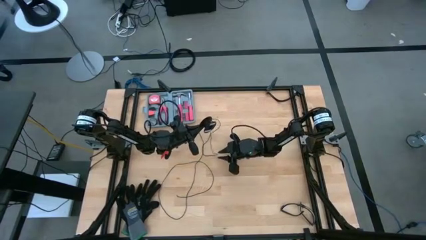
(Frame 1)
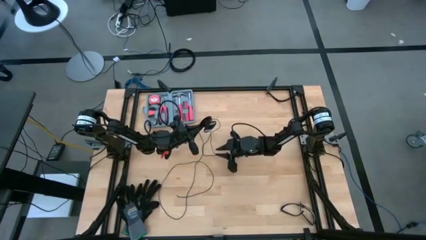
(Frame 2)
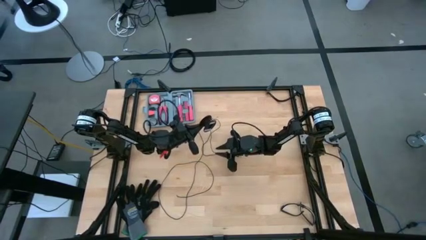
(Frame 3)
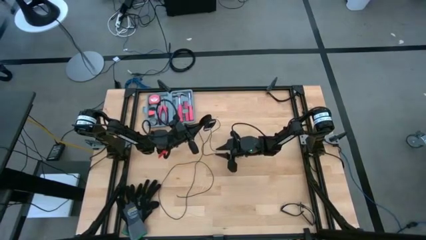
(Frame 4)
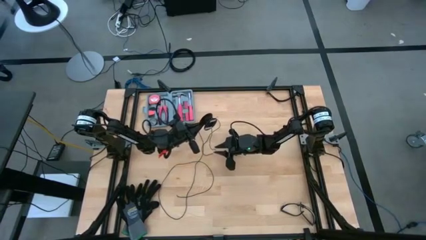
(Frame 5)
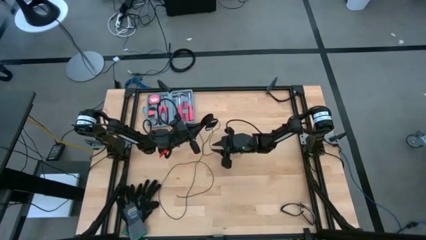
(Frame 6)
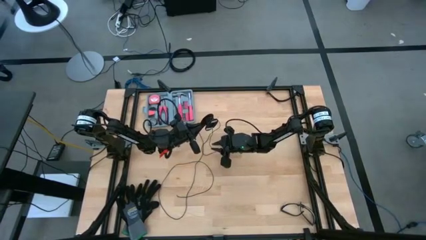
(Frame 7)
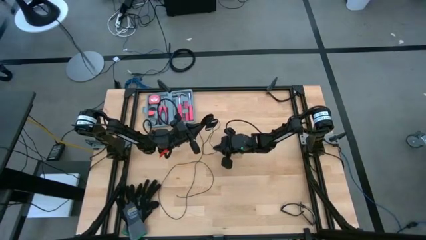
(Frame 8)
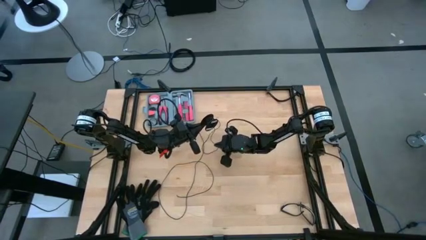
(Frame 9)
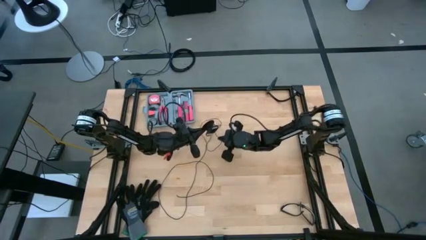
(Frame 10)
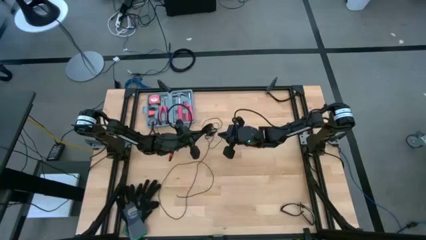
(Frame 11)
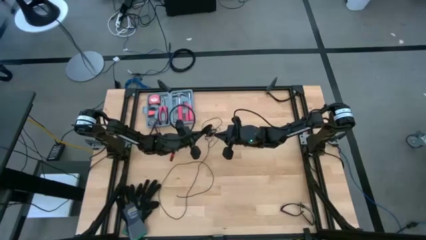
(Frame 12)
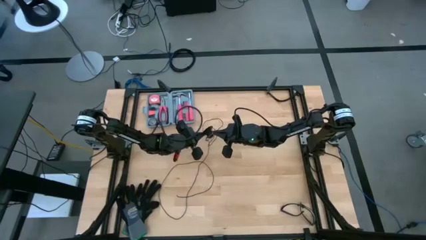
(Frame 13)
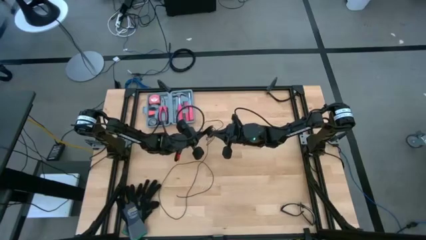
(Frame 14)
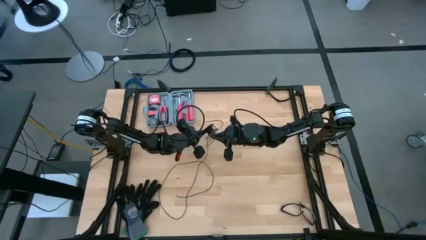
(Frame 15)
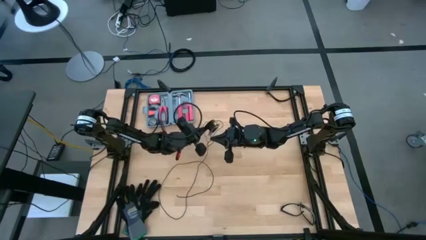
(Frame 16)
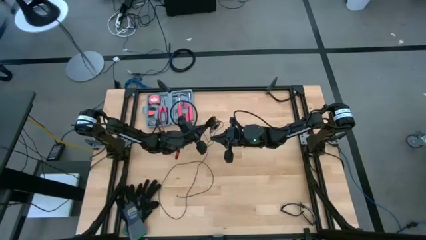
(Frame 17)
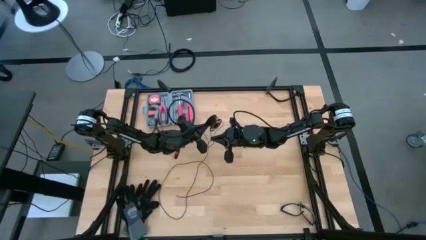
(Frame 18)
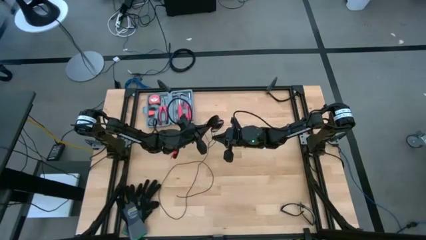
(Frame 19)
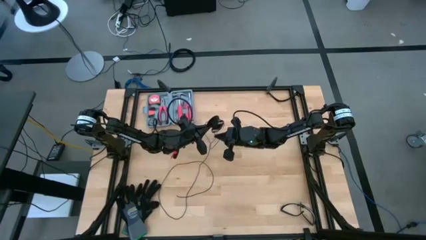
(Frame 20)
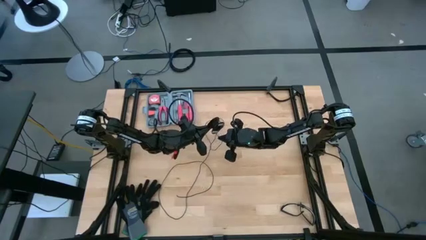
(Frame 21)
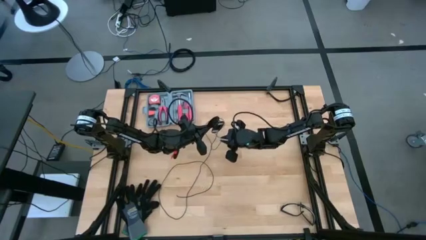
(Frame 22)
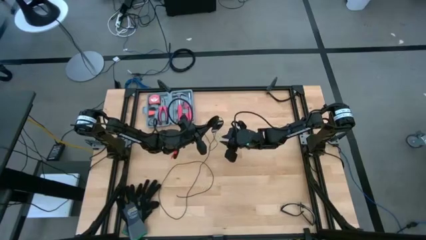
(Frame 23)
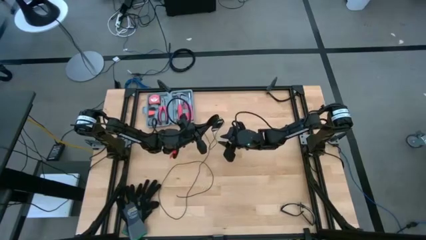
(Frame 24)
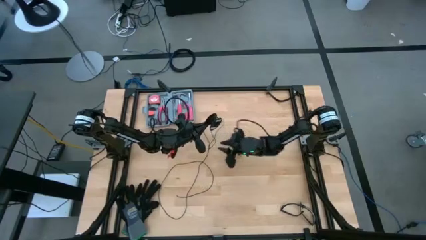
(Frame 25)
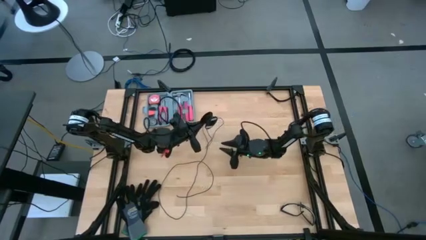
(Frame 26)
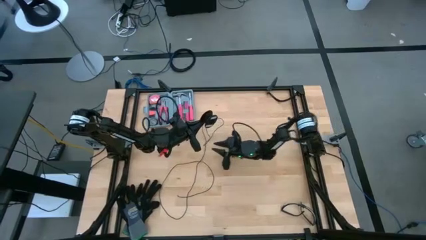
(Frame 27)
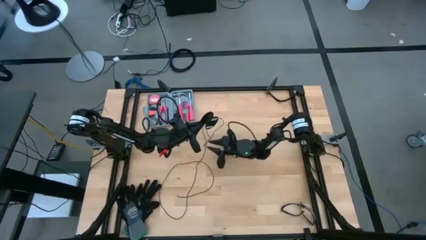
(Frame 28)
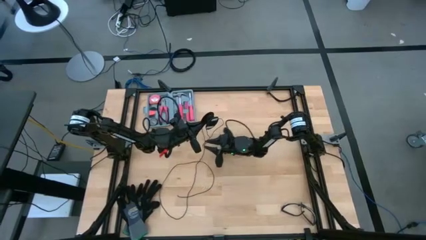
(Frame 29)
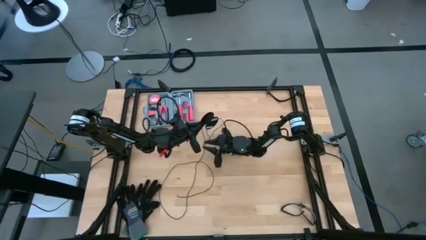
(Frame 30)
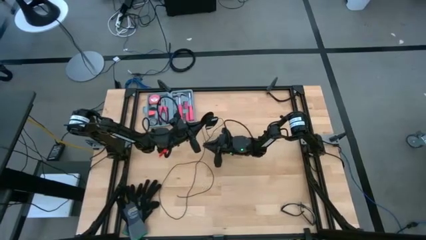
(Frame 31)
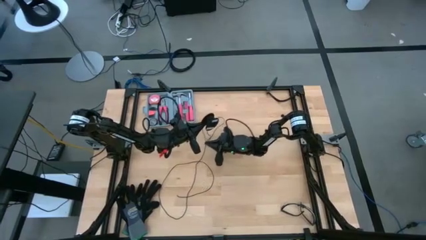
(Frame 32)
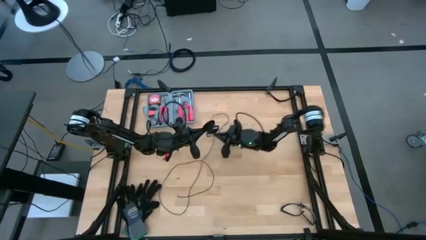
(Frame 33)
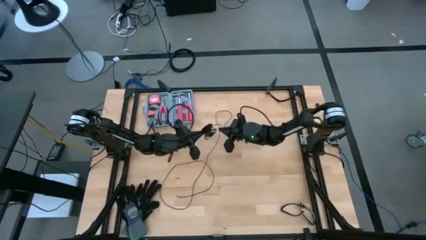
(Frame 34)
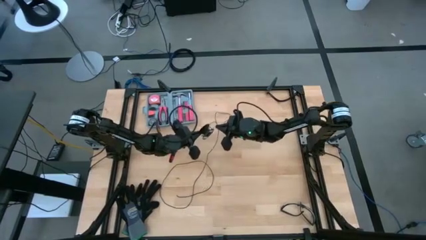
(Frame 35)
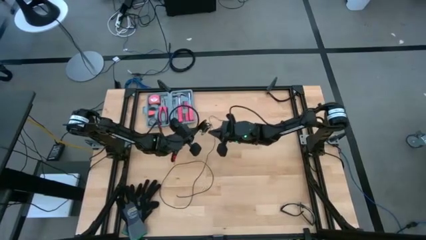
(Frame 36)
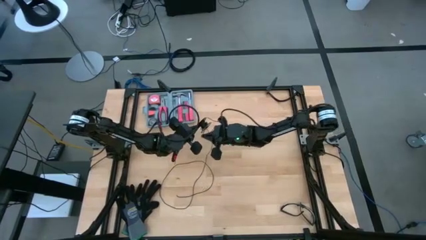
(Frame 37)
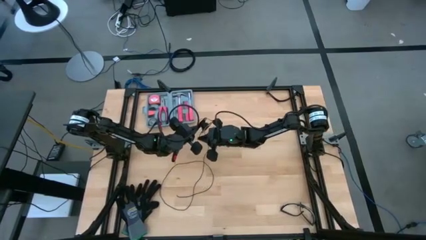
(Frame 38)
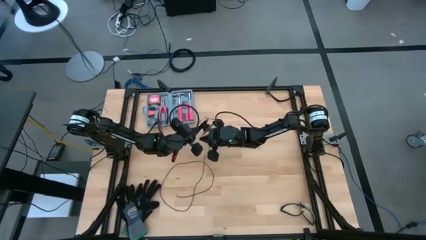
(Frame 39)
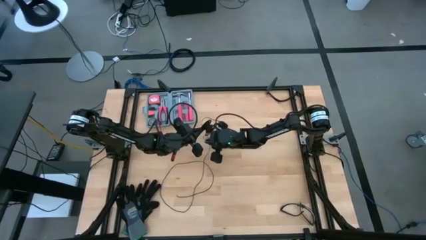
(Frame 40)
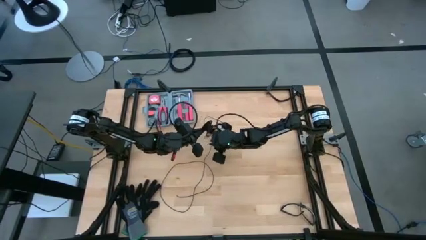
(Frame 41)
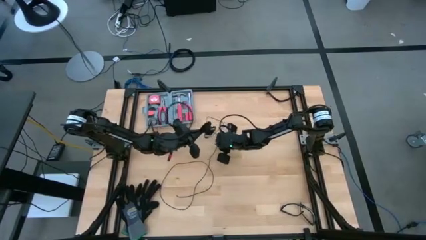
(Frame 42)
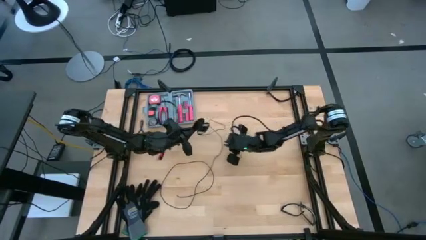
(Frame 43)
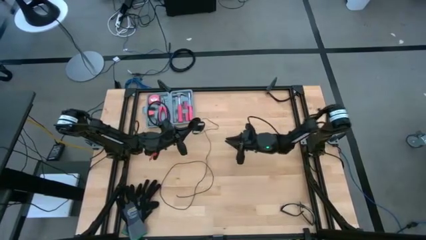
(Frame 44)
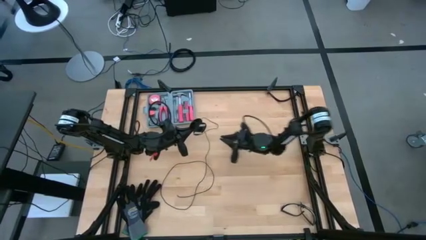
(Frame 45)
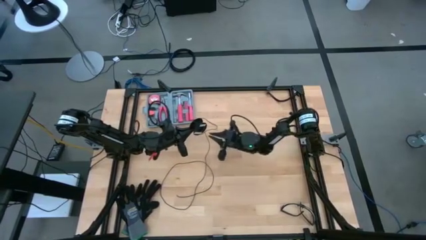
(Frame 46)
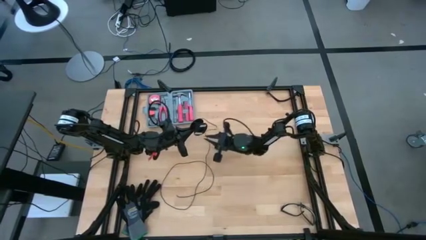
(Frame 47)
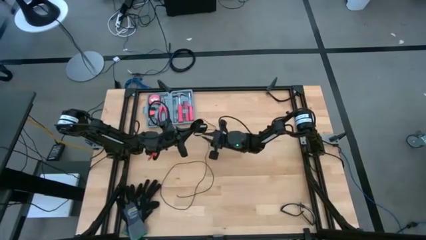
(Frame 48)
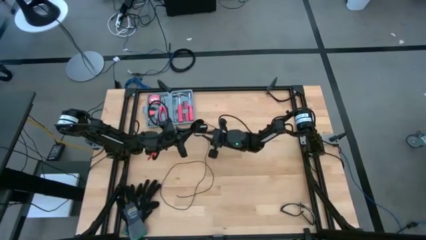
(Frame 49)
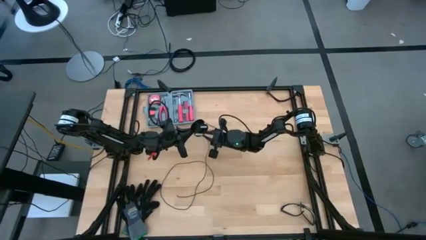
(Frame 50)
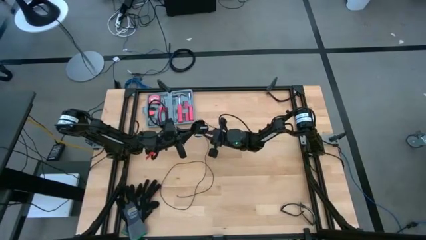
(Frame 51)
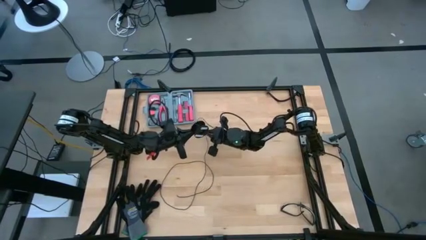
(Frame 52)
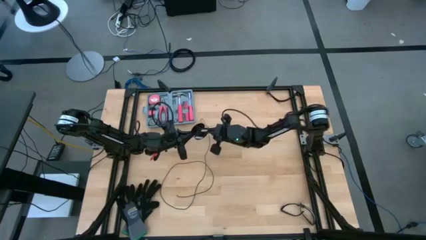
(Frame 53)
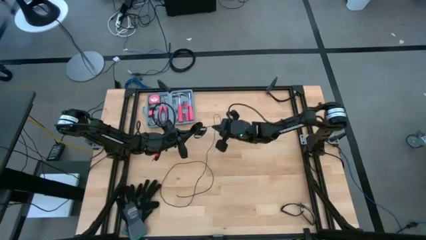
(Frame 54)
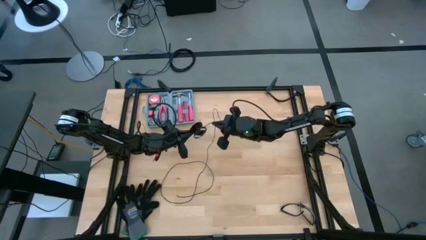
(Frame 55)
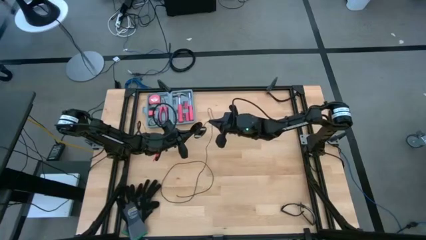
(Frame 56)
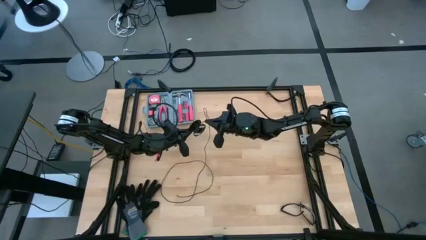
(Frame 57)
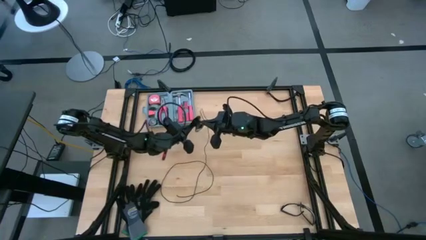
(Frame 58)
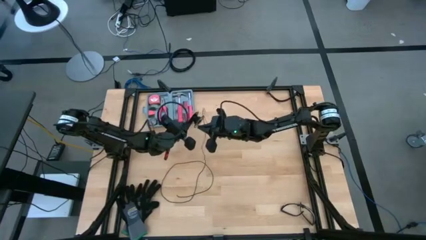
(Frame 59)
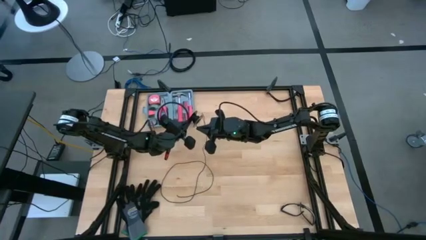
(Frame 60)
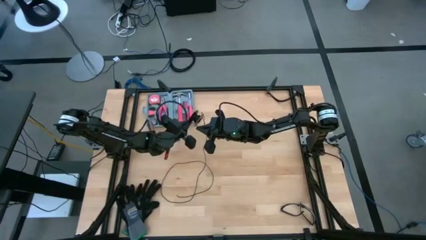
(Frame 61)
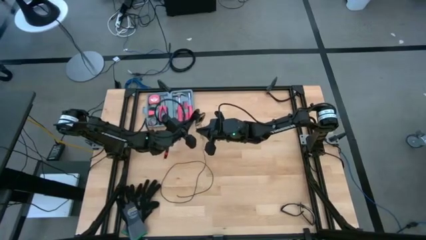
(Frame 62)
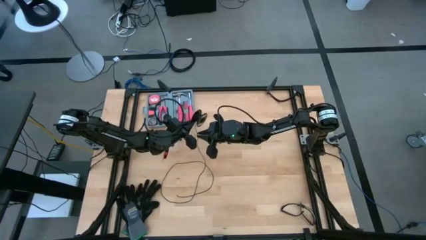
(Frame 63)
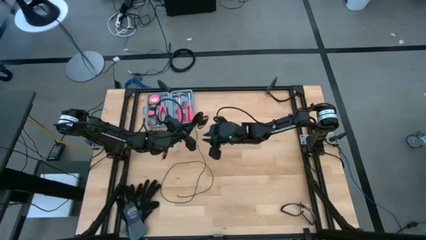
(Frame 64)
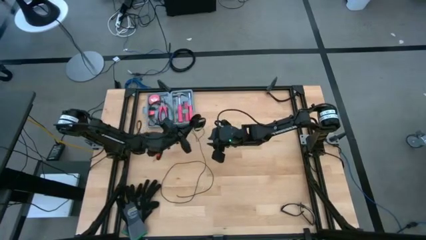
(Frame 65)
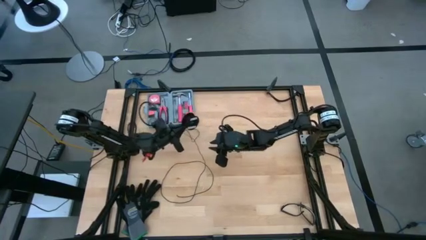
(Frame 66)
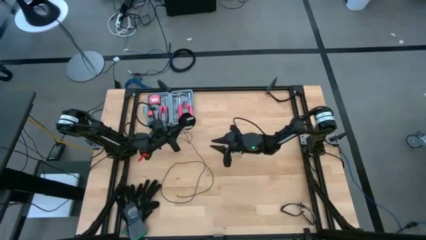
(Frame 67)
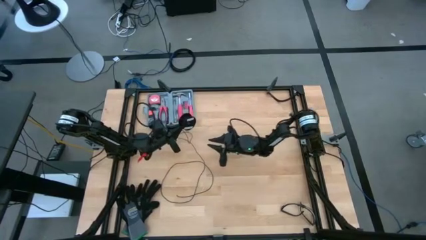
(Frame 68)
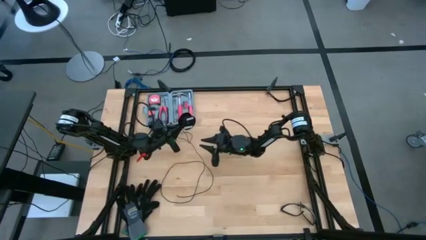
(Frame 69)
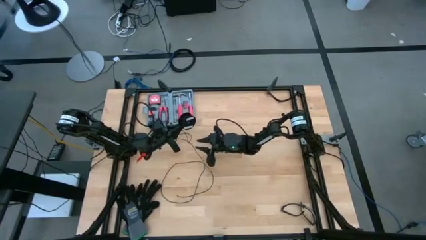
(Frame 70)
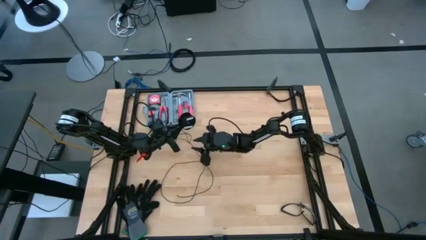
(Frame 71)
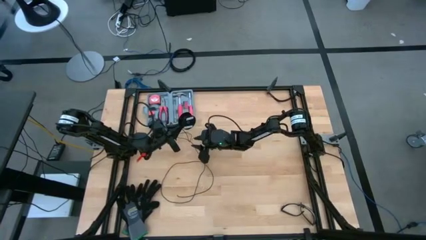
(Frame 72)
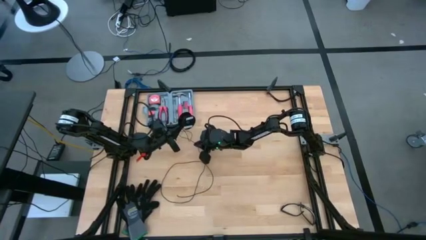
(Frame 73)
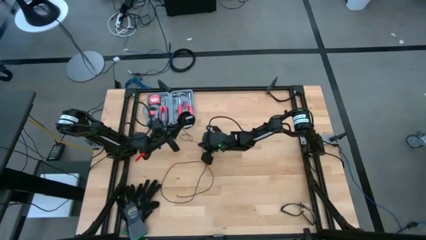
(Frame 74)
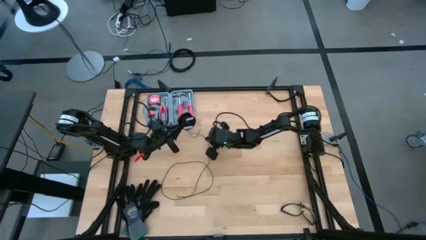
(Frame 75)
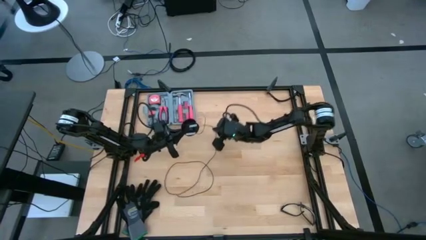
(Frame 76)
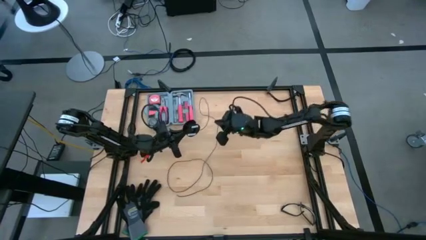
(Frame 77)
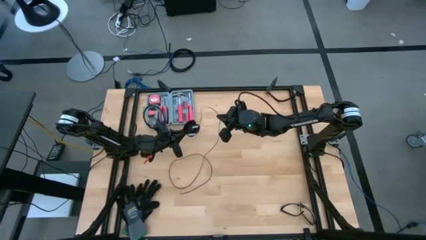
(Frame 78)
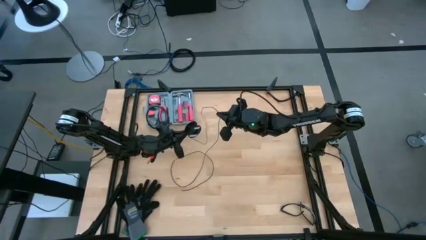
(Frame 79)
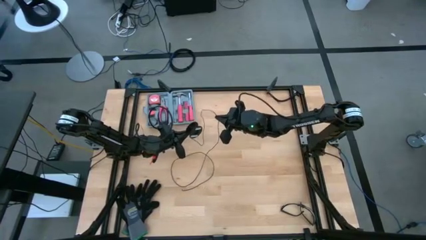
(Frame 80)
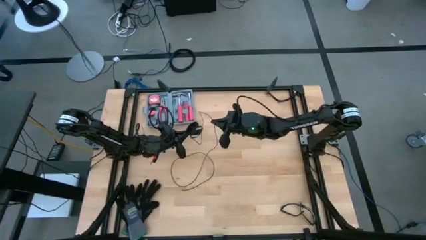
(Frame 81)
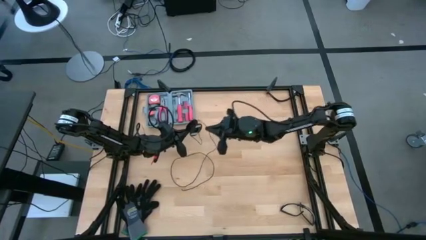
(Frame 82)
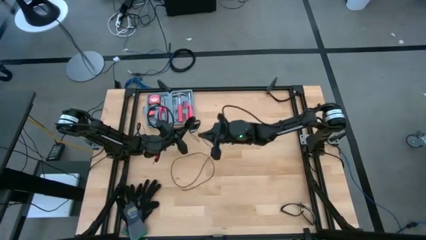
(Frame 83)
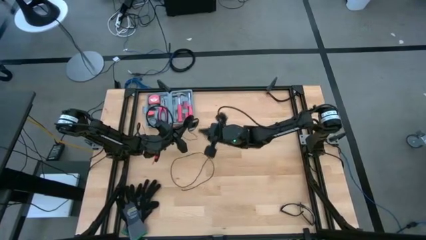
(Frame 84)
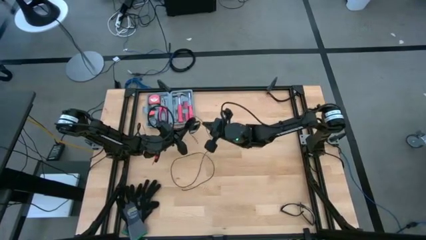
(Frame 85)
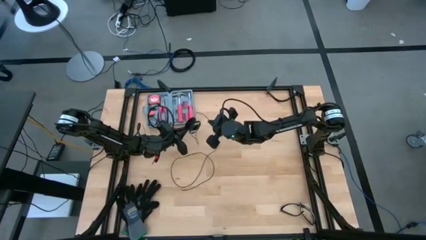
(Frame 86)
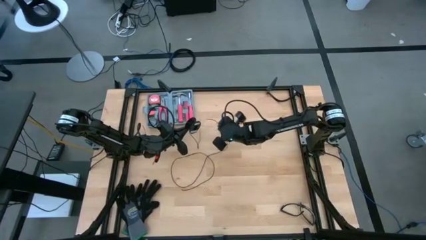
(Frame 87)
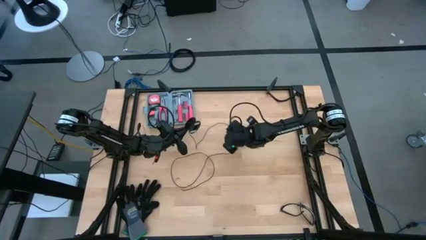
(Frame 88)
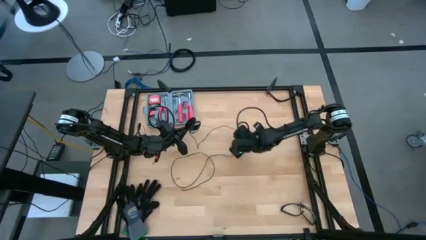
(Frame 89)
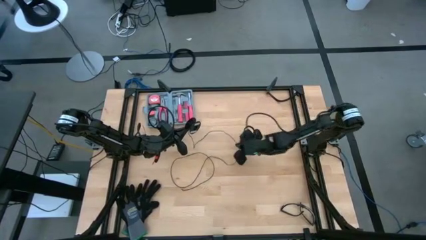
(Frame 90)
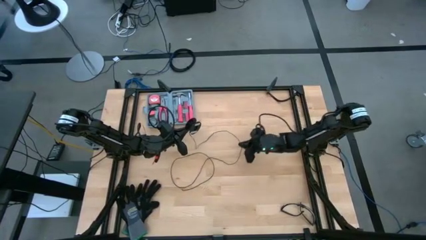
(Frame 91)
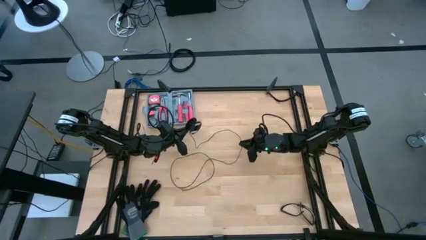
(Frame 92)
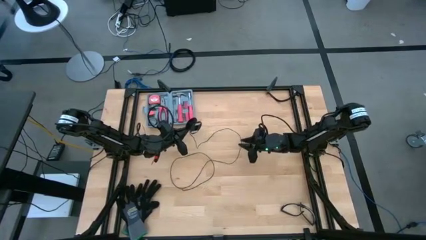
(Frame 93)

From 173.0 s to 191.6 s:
Task: Coil cords
Coil the black wire onto the spool
